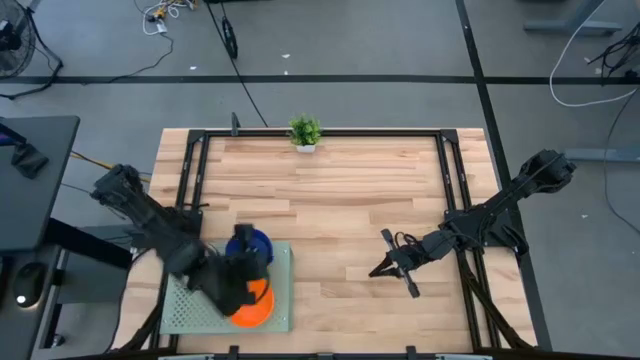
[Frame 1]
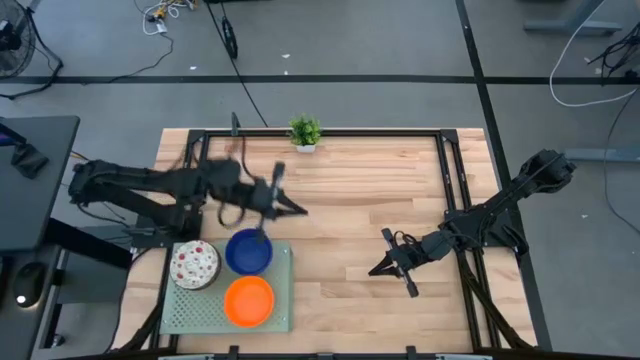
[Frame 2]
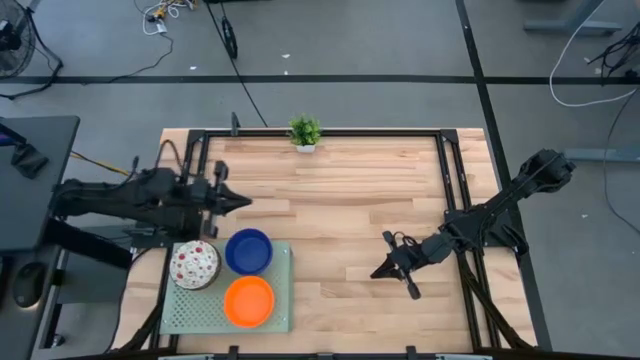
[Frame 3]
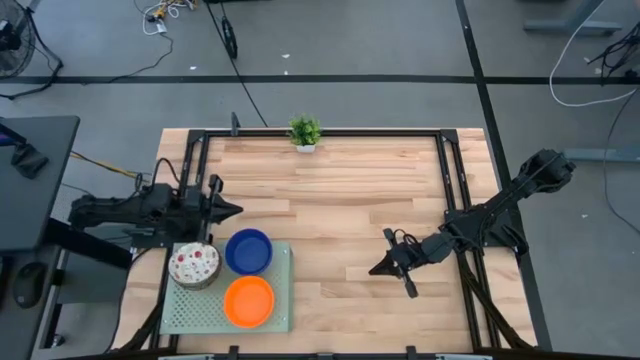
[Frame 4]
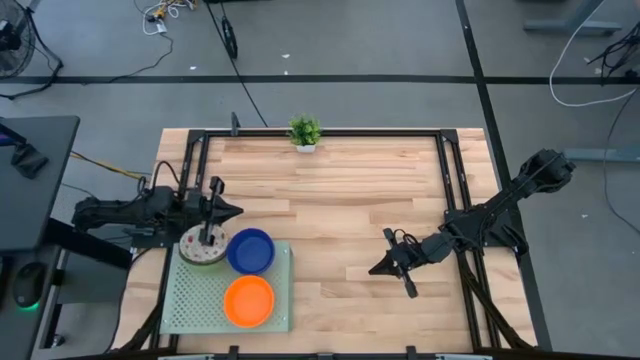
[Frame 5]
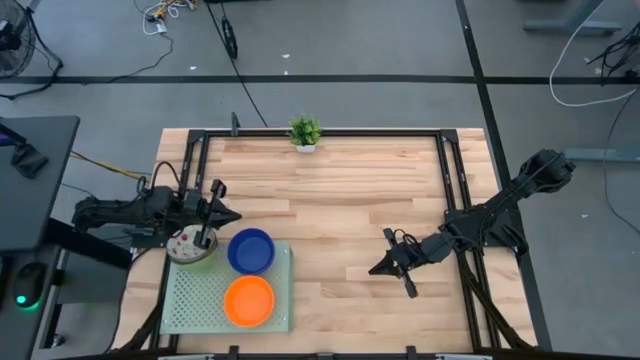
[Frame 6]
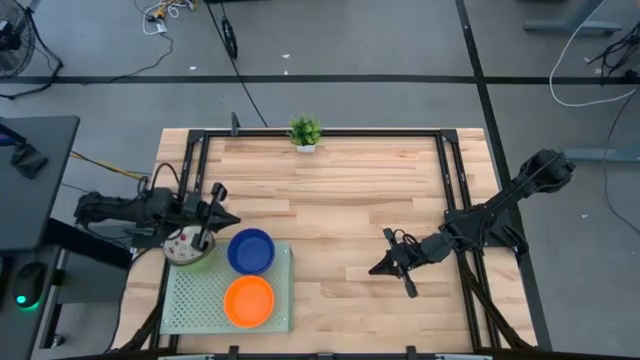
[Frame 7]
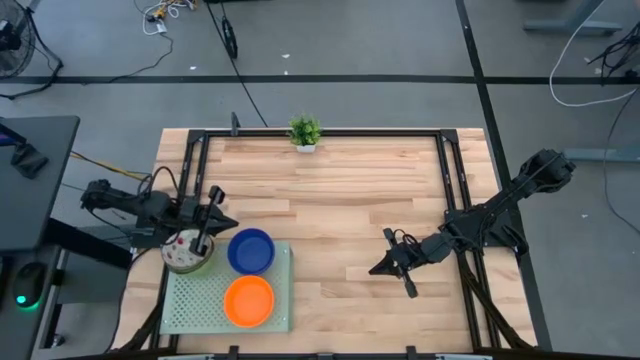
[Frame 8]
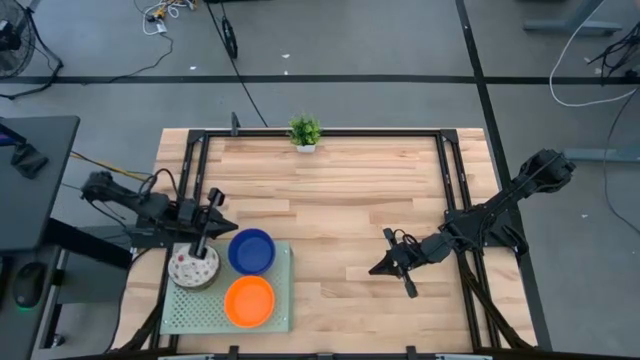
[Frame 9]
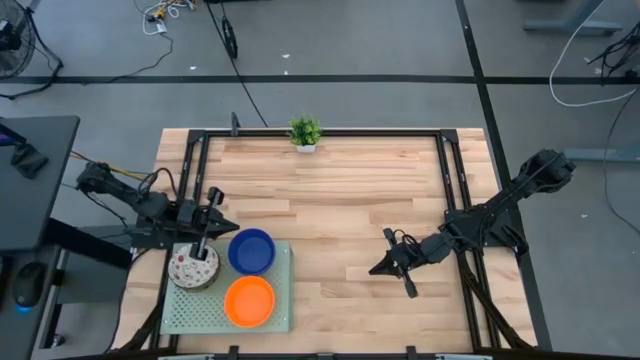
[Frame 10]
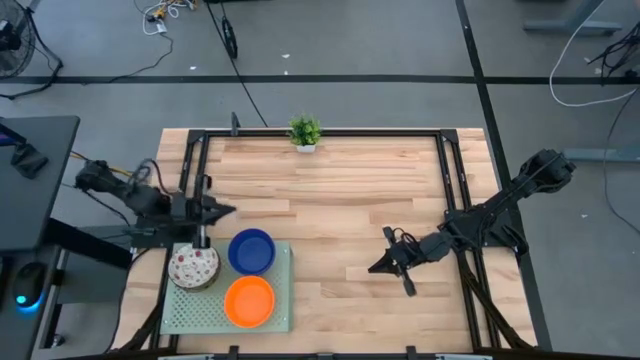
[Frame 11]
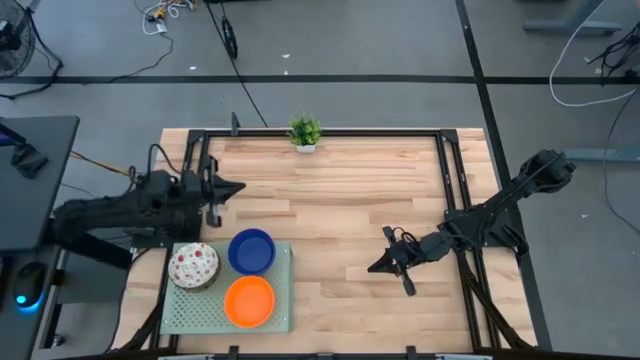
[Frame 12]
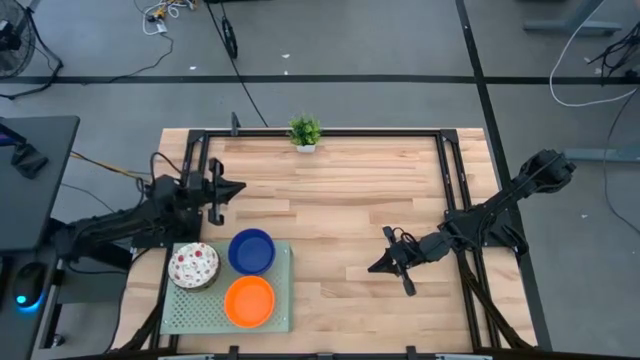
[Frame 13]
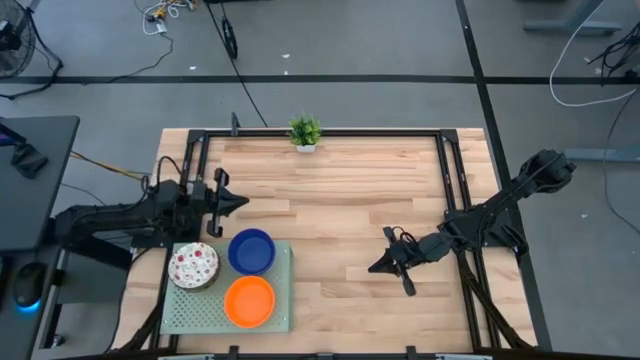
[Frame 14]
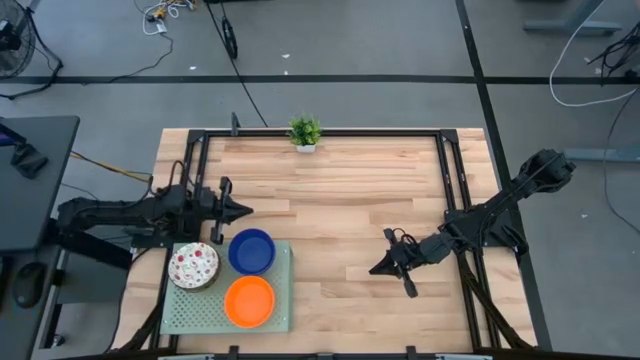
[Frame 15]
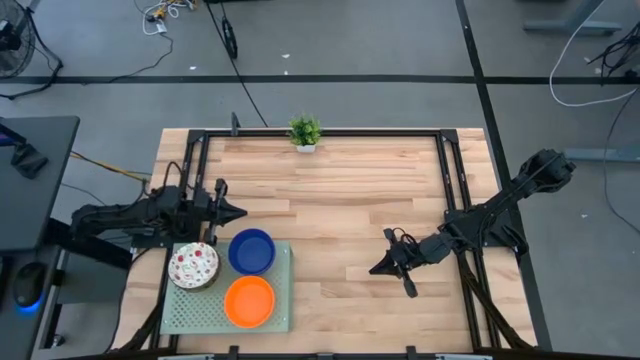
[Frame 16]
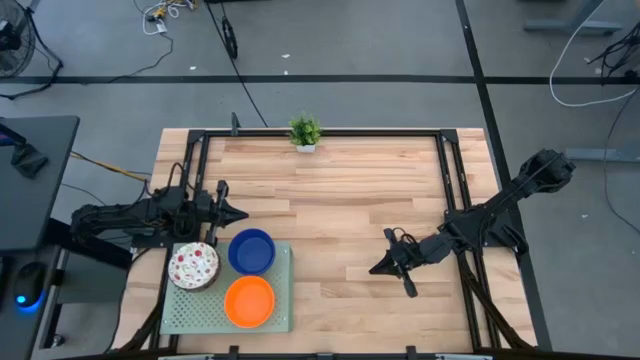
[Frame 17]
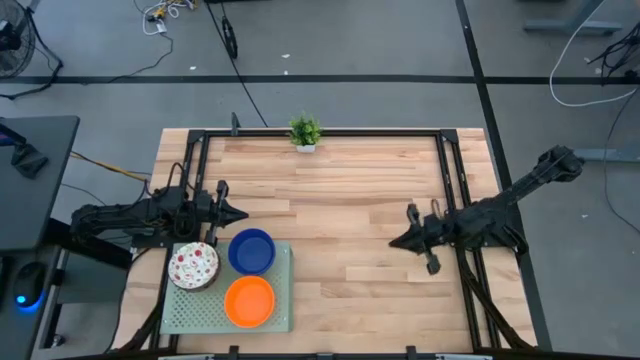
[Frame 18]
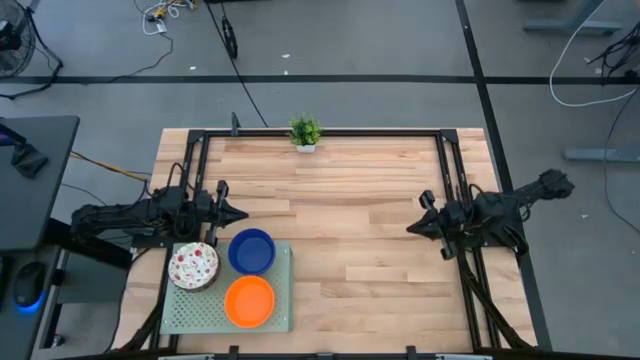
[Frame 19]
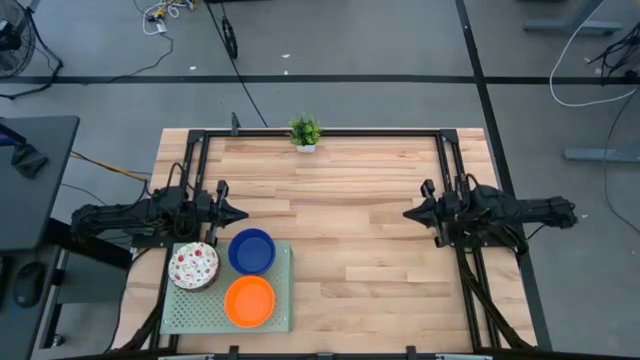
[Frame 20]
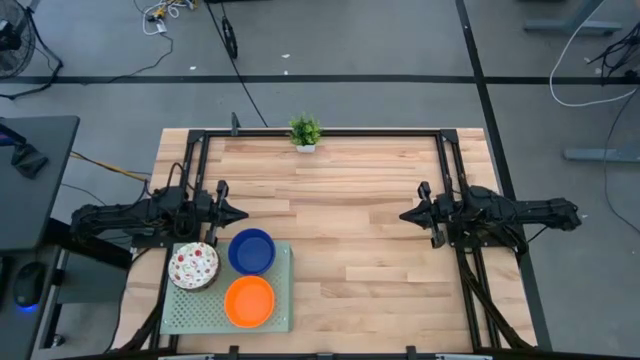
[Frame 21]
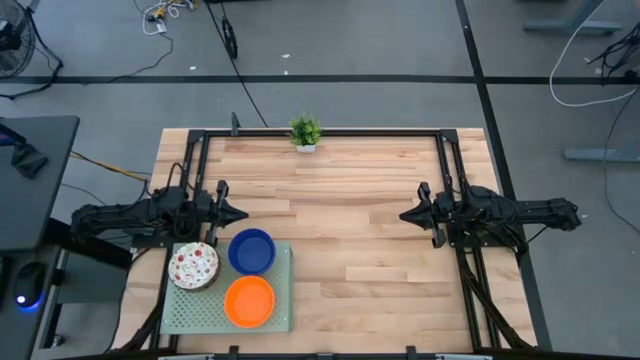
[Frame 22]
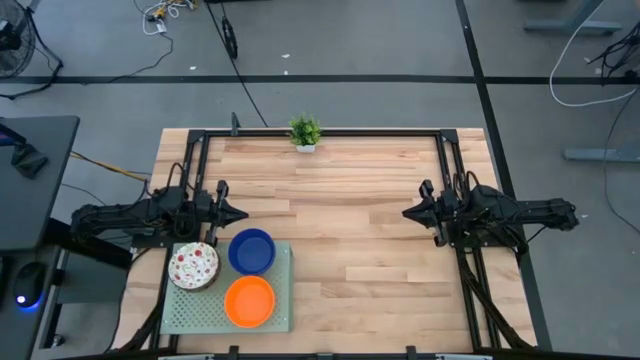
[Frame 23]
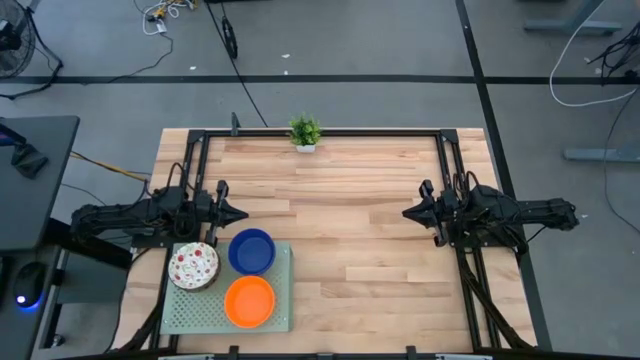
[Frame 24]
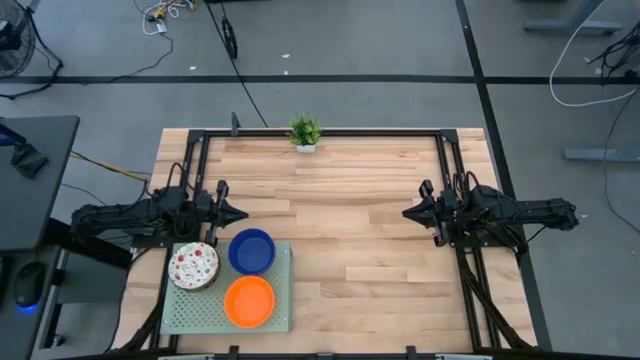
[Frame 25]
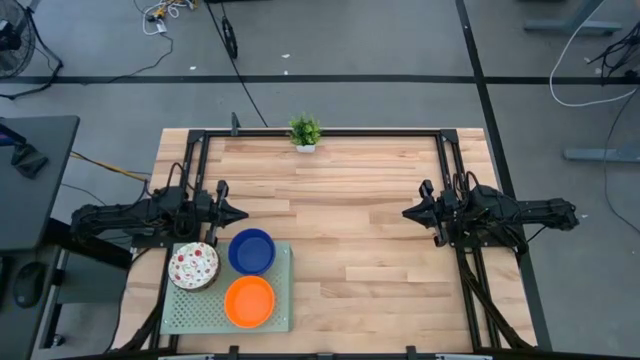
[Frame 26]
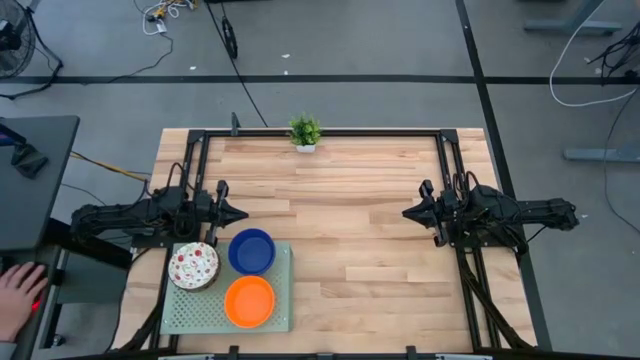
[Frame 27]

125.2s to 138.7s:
Task: Pick & Place Mini bowls
Return to Home Position

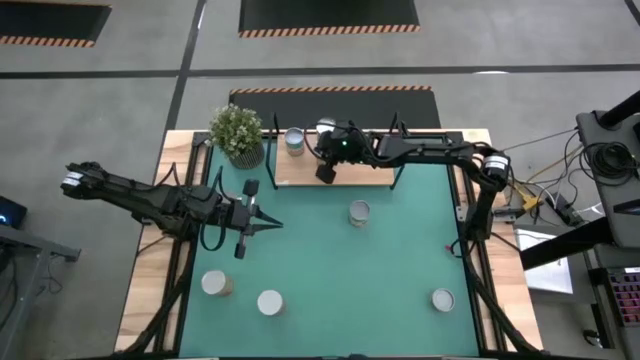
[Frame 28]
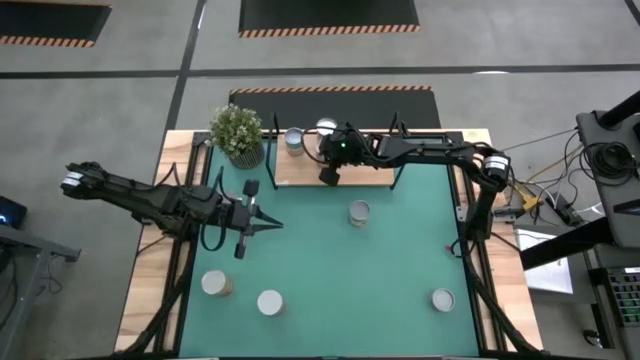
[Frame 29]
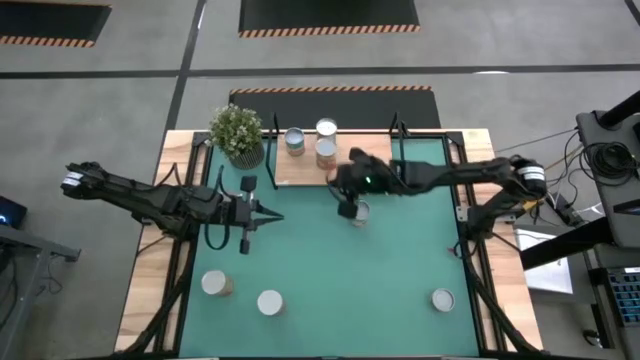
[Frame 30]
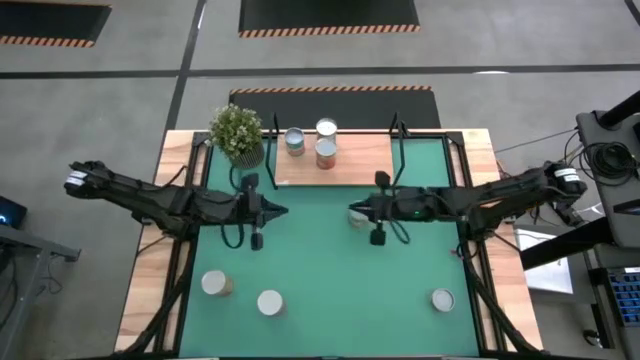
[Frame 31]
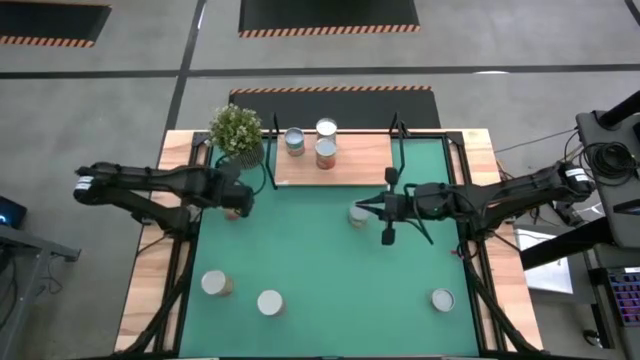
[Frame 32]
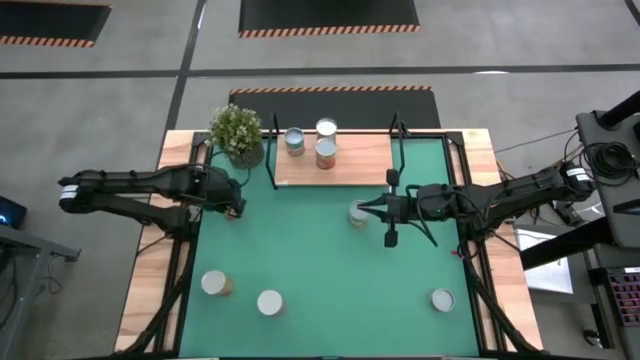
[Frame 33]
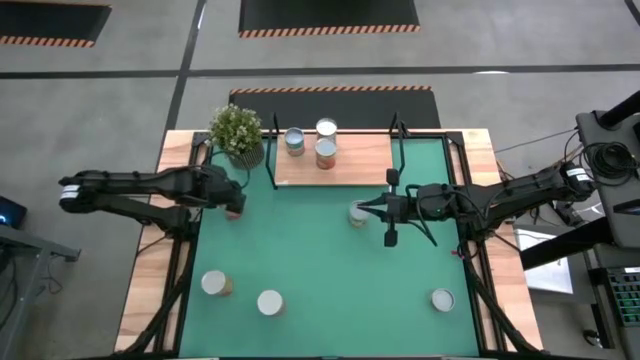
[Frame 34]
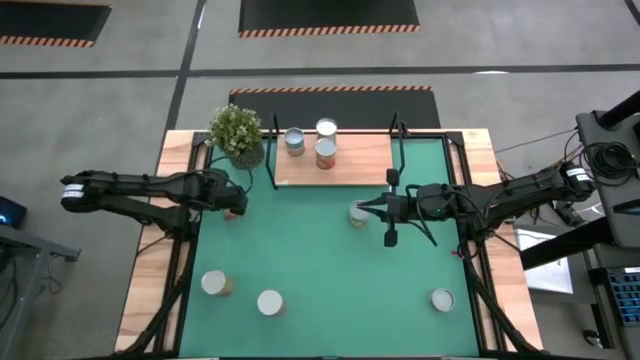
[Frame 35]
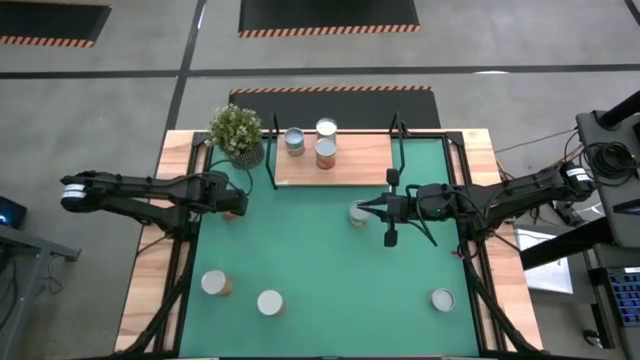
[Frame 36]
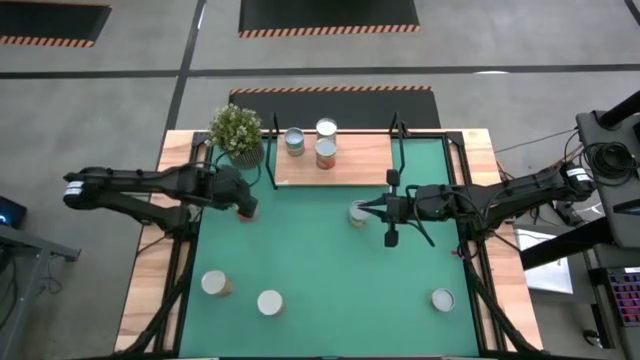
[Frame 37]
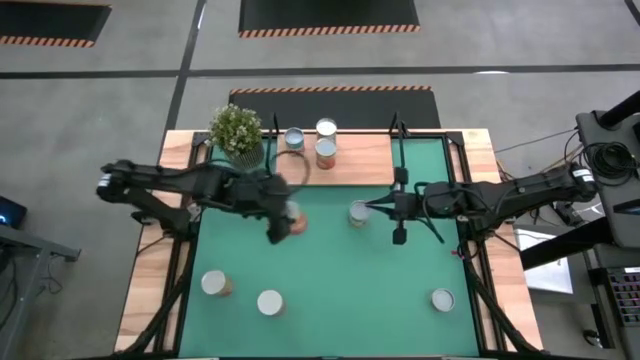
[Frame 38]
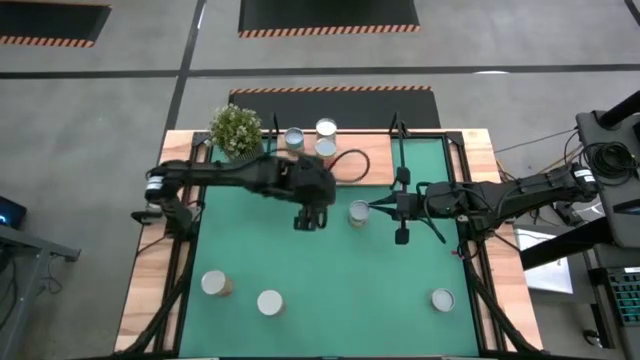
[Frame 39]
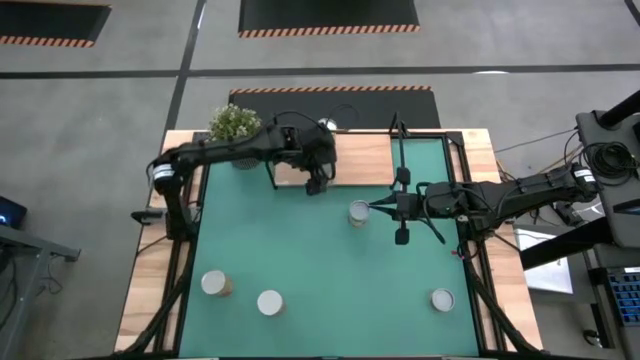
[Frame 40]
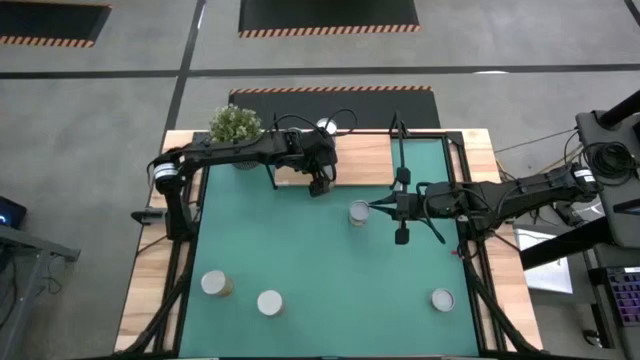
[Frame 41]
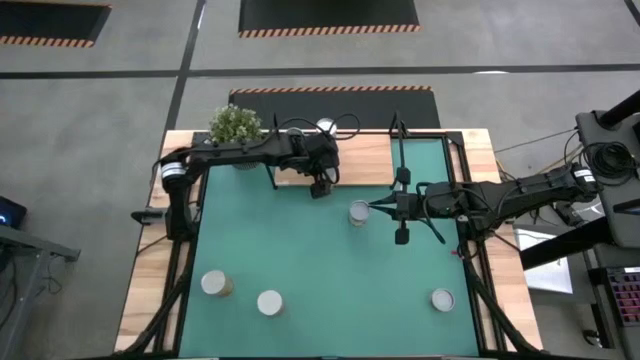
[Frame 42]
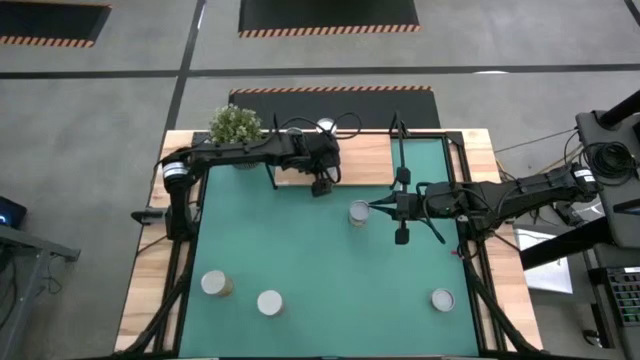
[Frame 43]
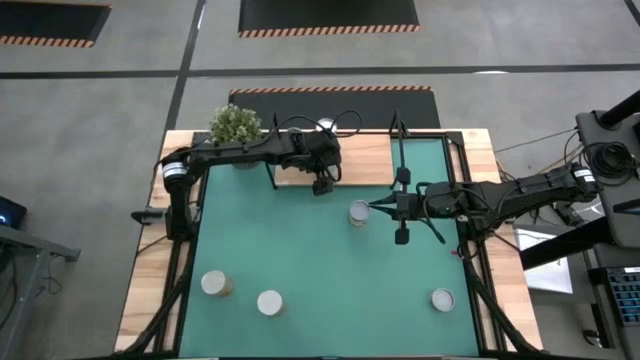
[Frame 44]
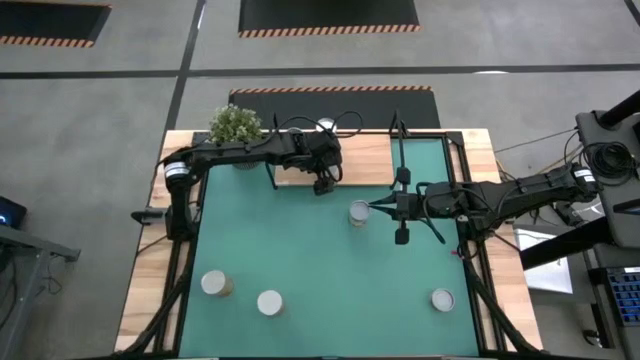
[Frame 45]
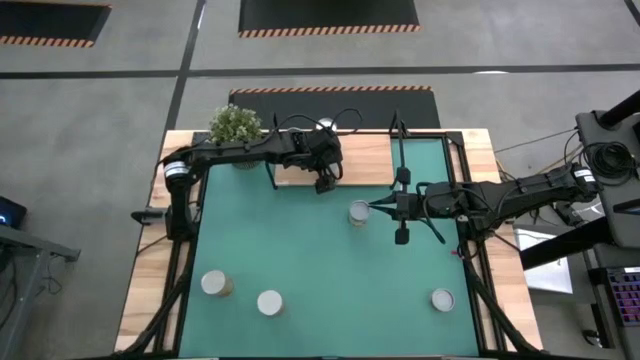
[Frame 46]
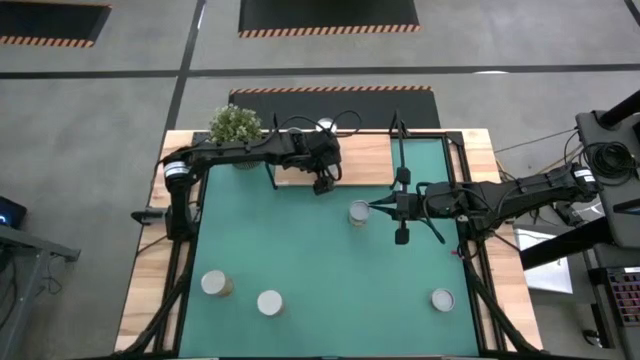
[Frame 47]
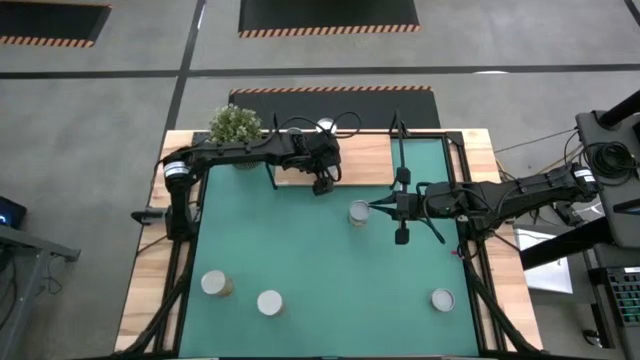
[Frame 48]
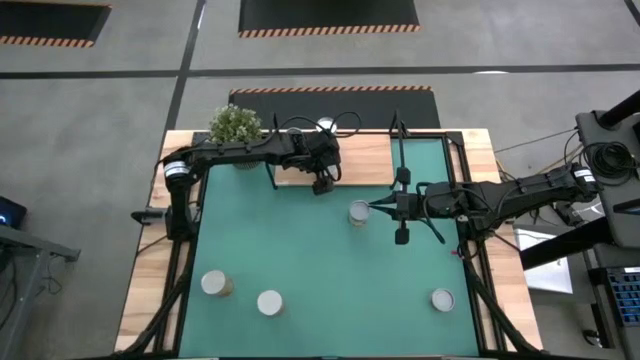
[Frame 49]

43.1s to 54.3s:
Task: Pick and place cans onto a shelf
Put the canned corn on the shelf
